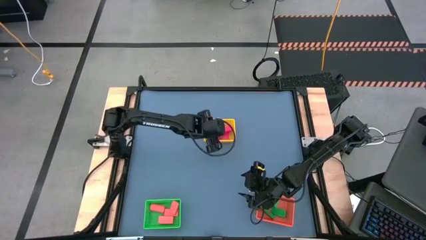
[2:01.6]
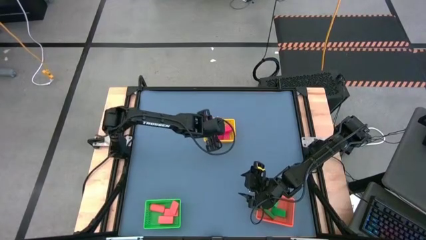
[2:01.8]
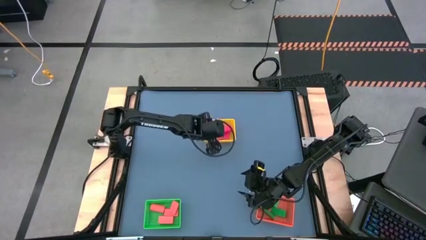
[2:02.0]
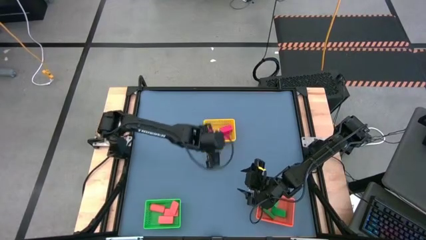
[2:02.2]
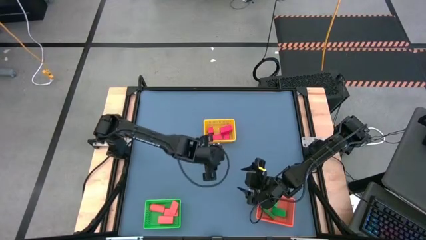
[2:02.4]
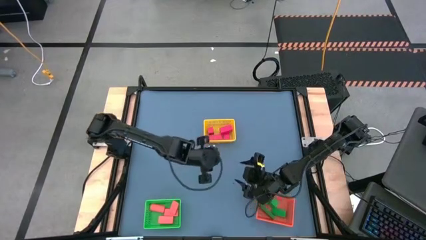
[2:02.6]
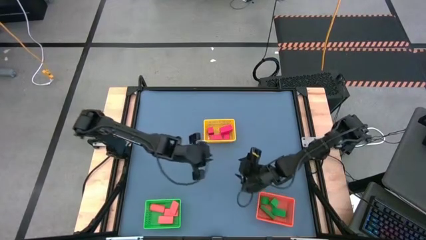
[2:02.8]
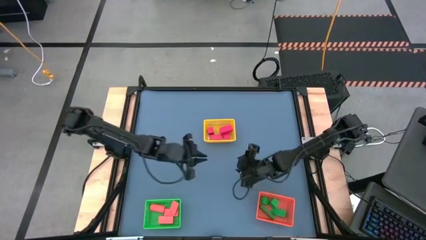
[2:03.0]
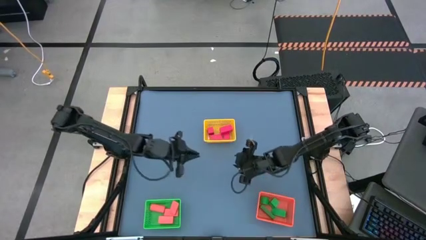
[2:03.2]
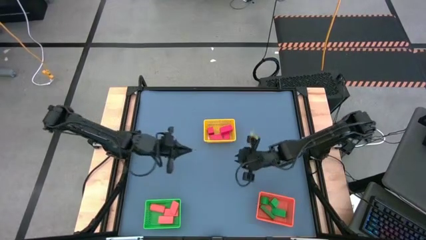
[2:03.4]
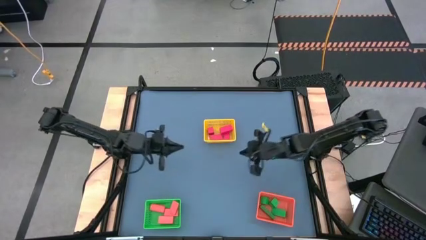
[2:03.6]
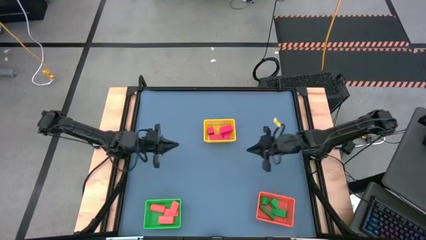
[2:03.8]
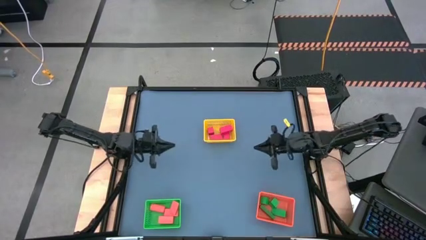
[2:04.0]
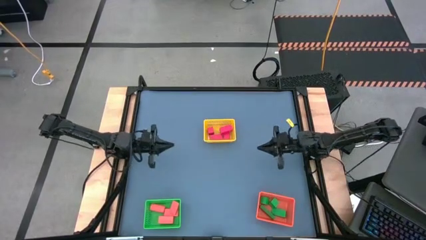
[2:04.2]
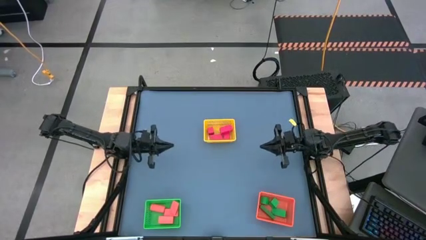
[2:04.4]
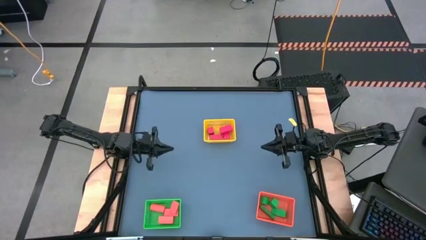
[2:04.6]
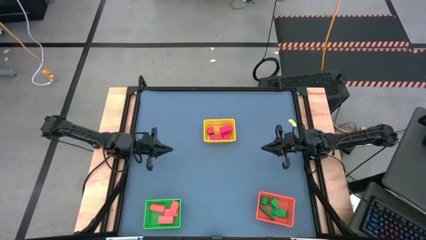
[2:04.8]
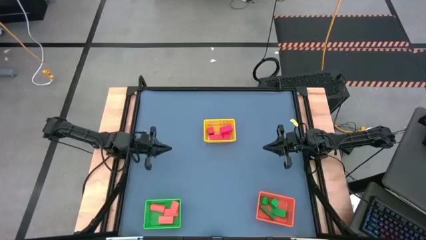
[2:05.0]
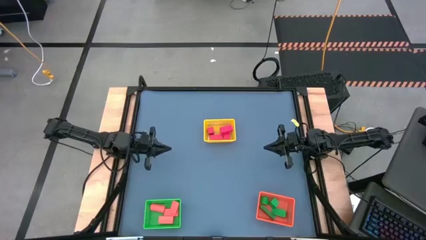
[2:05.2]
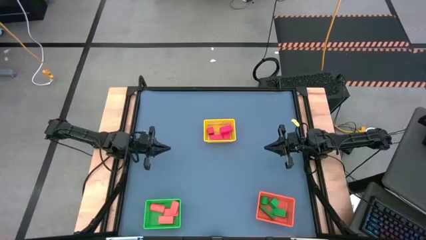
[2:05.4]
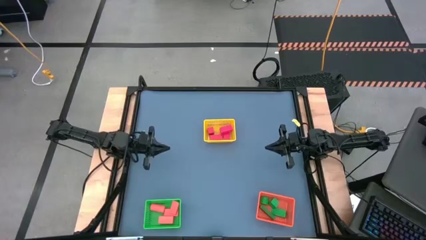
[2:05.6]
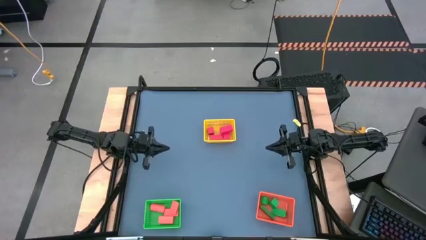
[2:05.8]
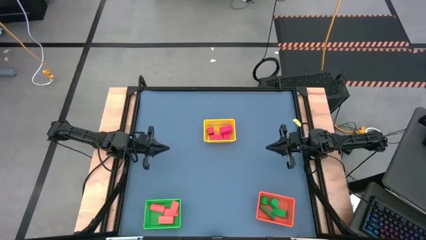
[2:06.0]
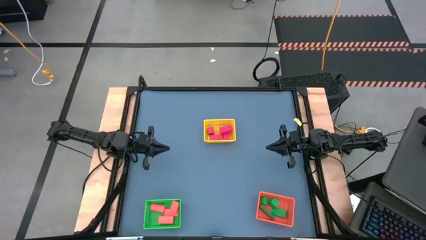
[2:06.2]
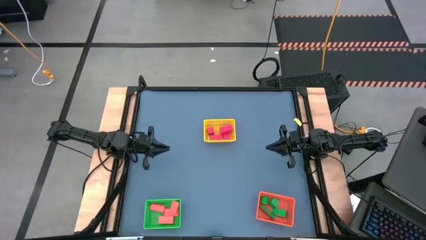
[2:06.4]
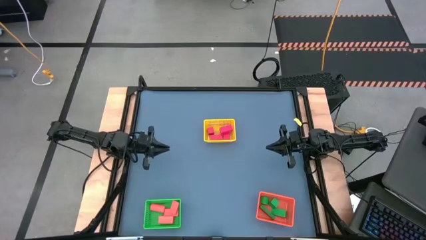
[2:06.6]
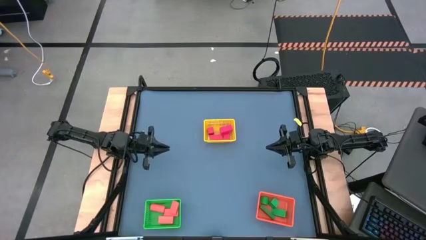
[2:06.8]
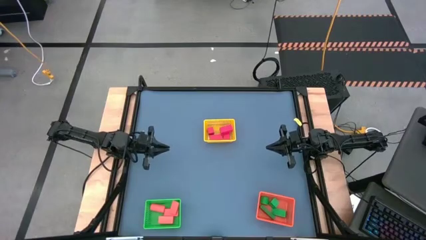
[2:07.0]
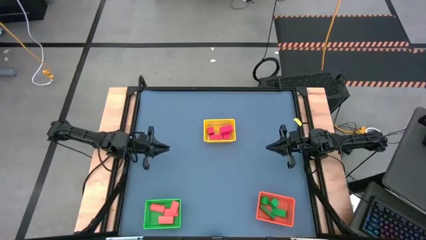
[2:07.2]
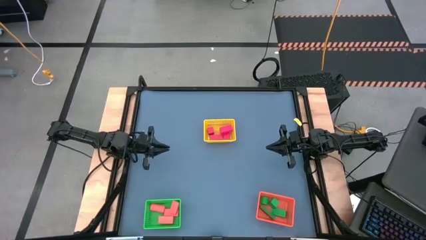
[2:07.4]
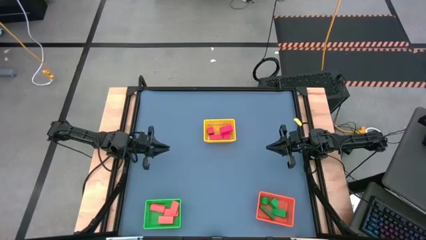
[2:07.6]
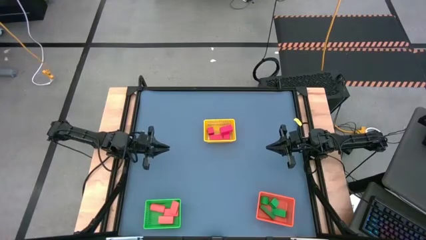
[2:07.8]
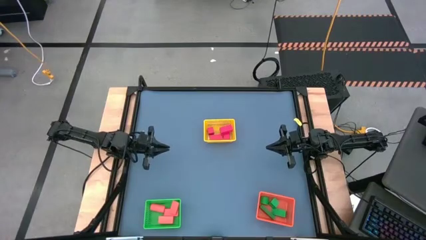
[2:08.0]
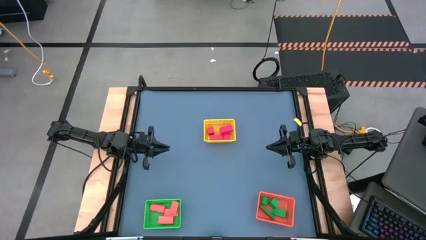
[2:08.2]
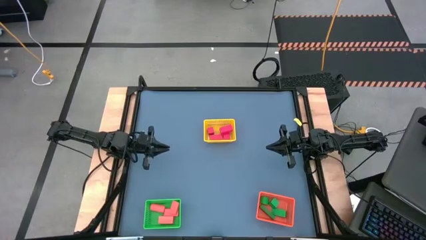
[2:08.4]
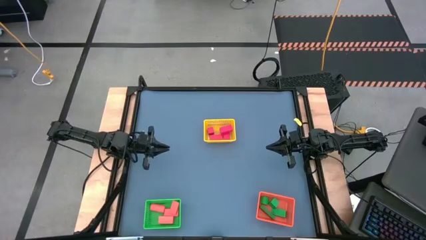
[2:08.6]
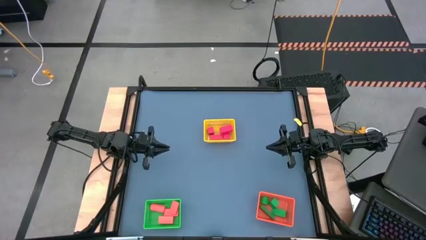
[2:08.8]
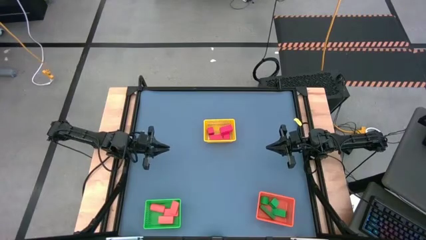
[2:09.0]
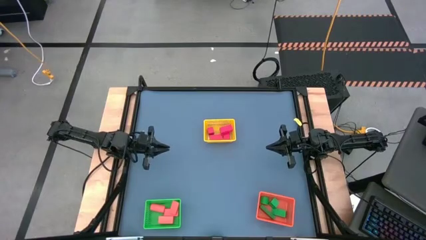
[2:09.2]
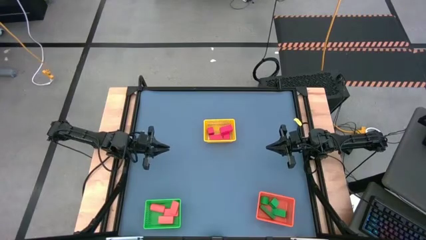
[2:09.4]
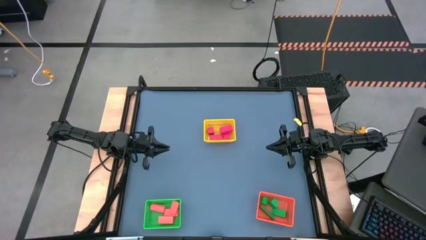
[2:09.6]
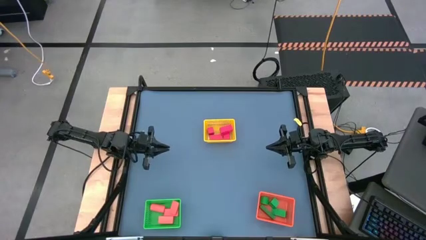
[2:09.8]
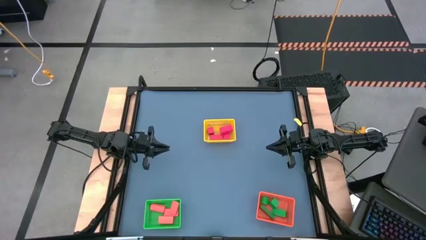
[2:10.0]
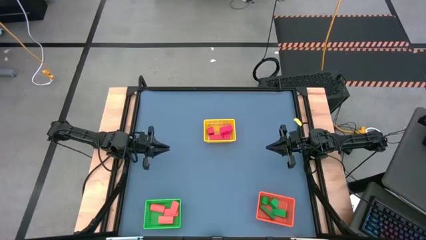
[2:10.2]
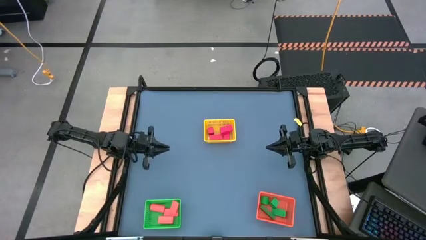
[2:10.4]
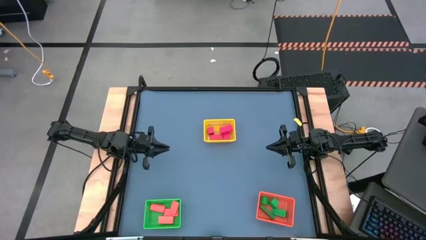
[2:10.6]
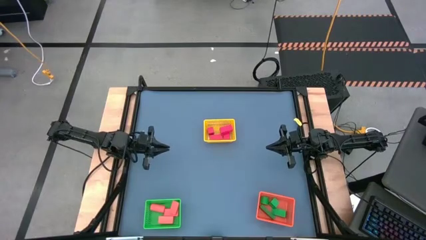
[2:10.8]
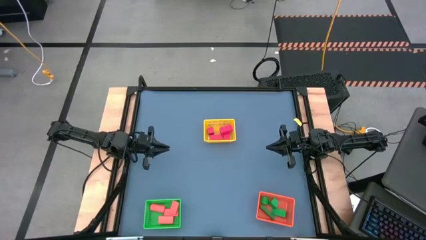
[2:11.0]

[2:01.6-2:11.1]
Task: Sort & place blocks by color
Return to Home Position

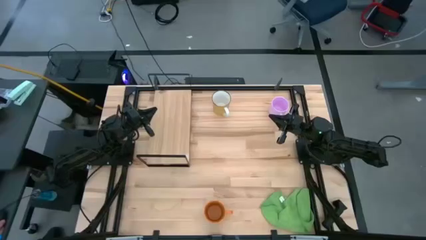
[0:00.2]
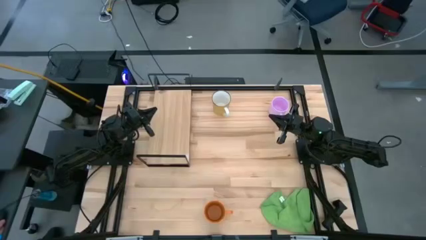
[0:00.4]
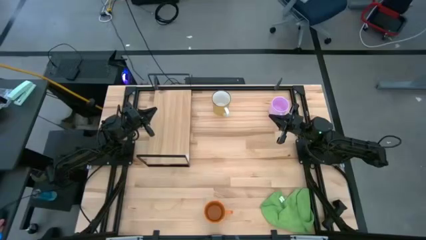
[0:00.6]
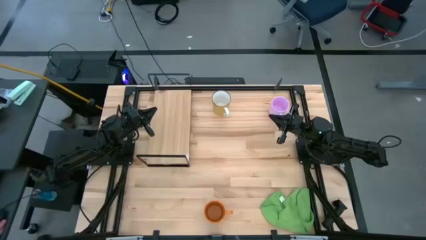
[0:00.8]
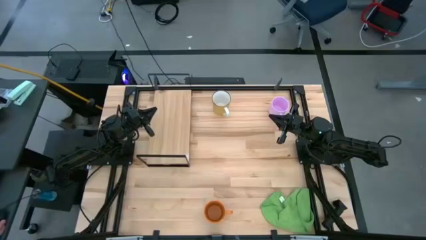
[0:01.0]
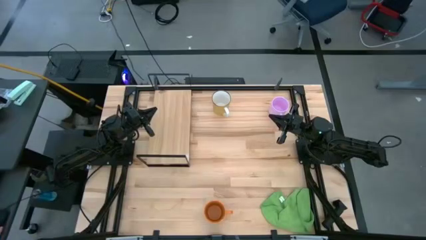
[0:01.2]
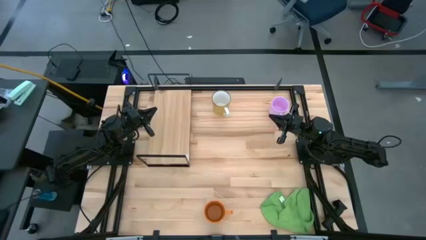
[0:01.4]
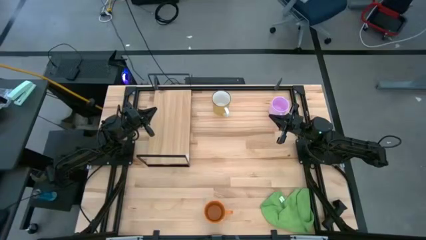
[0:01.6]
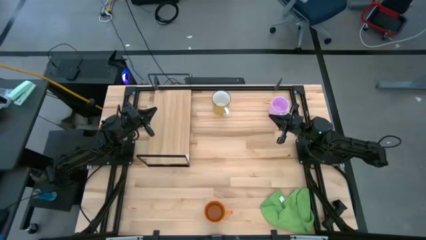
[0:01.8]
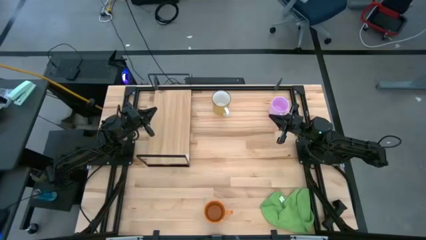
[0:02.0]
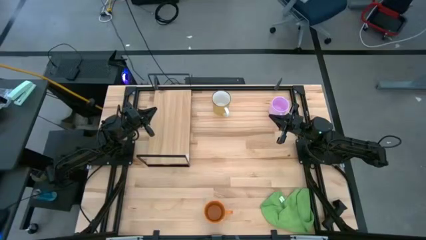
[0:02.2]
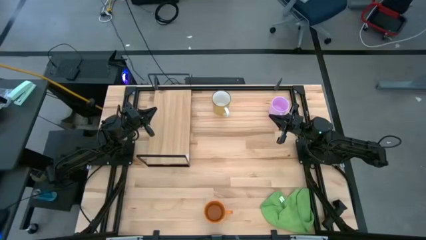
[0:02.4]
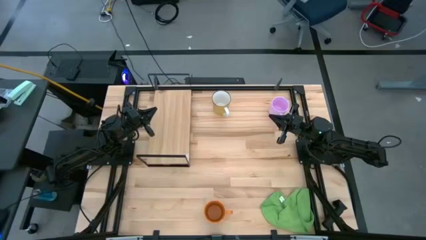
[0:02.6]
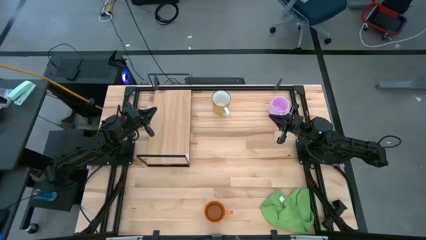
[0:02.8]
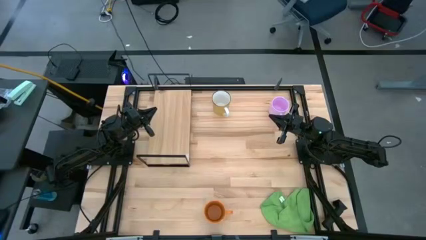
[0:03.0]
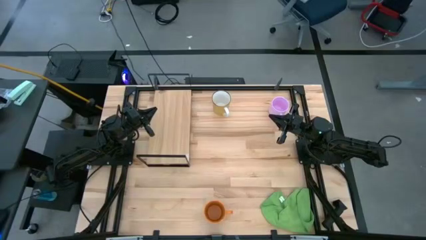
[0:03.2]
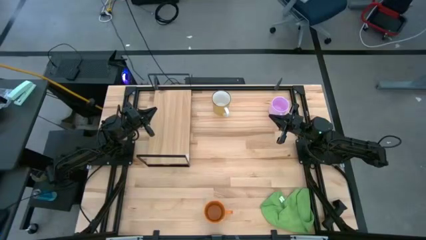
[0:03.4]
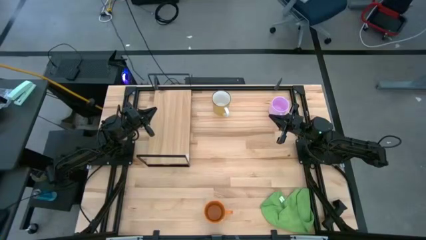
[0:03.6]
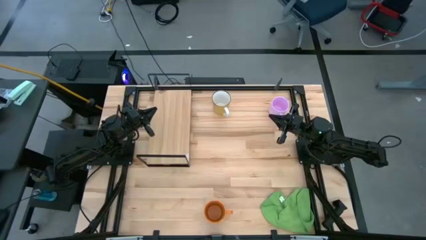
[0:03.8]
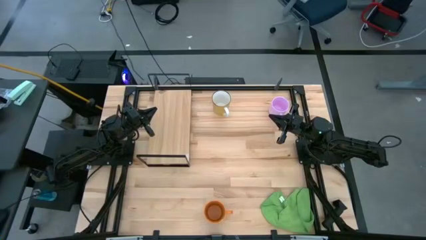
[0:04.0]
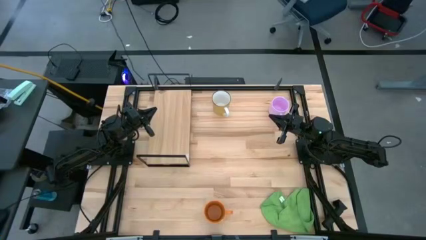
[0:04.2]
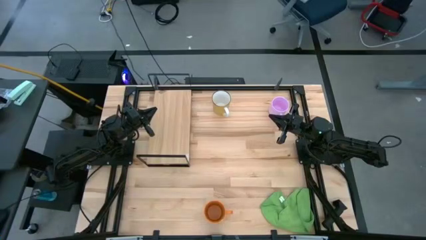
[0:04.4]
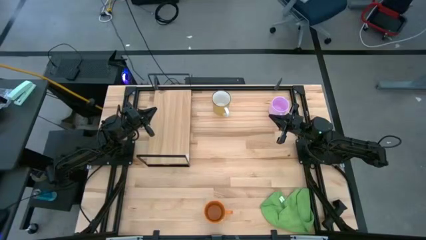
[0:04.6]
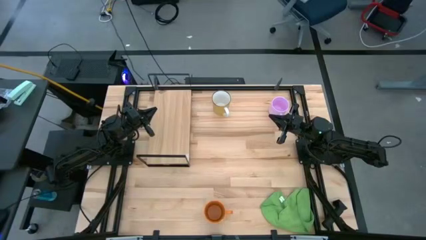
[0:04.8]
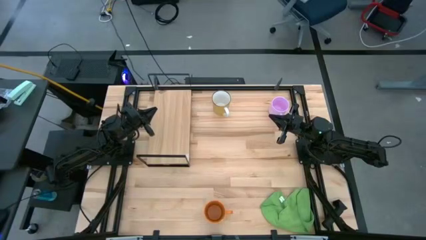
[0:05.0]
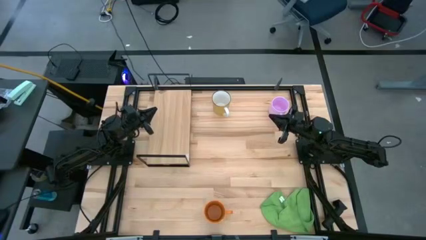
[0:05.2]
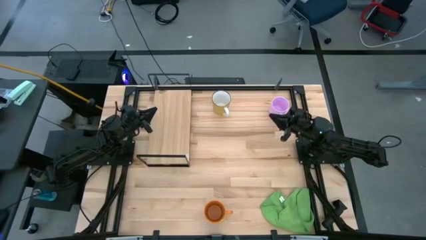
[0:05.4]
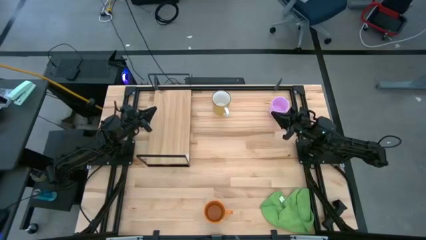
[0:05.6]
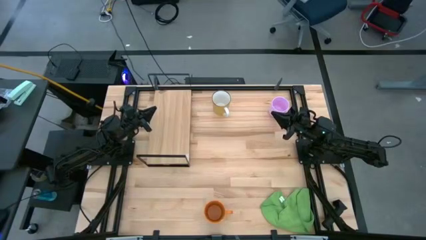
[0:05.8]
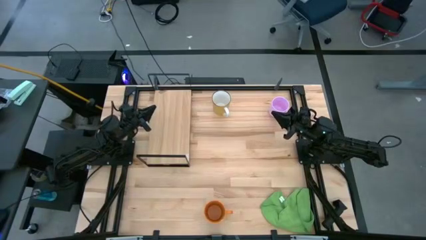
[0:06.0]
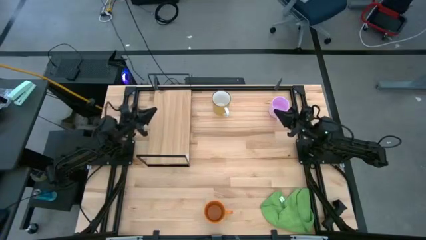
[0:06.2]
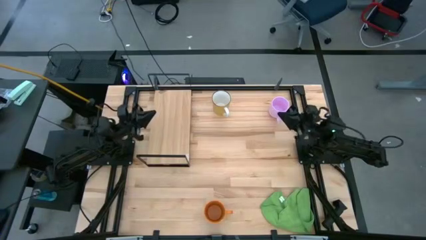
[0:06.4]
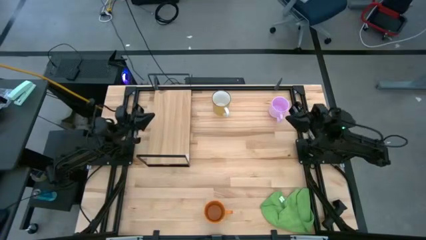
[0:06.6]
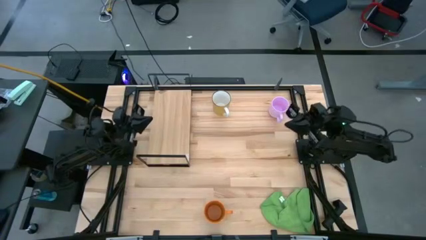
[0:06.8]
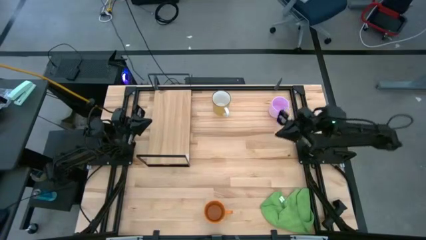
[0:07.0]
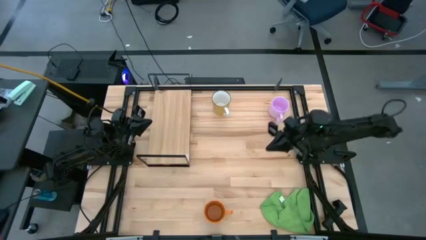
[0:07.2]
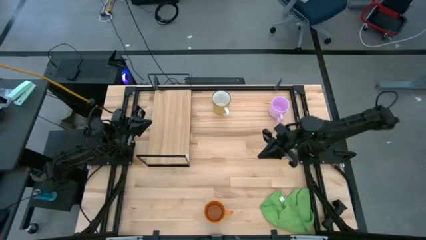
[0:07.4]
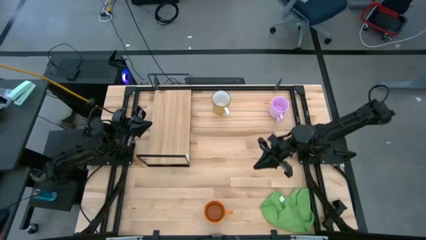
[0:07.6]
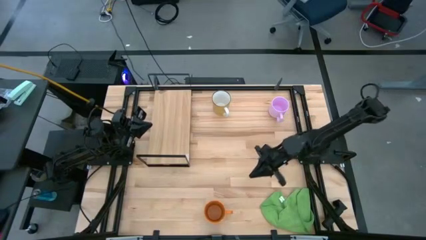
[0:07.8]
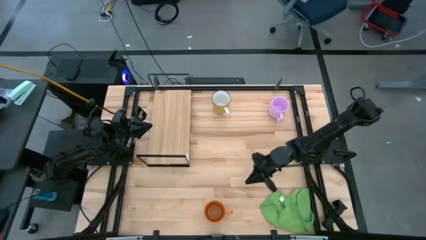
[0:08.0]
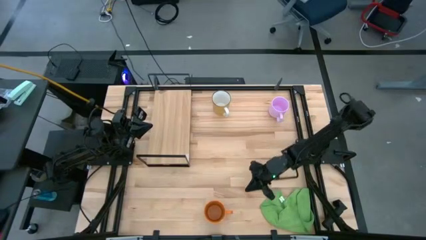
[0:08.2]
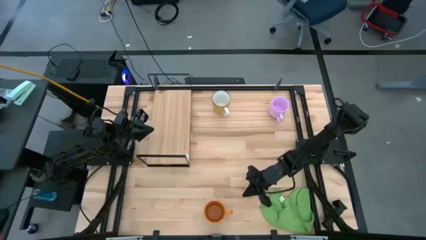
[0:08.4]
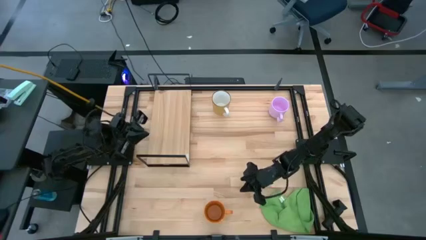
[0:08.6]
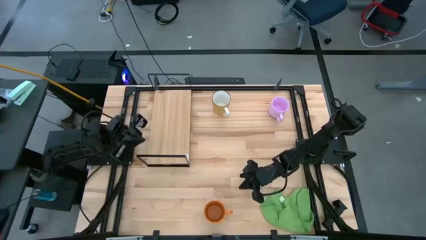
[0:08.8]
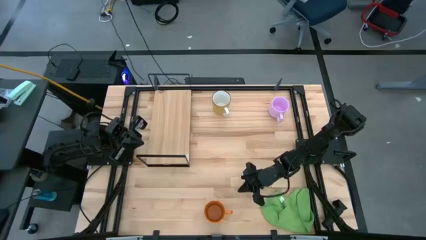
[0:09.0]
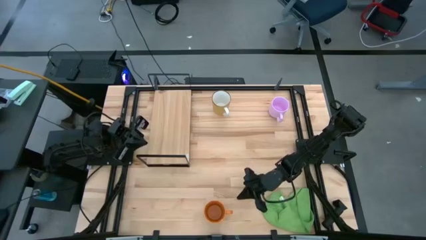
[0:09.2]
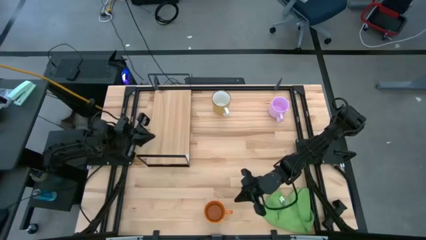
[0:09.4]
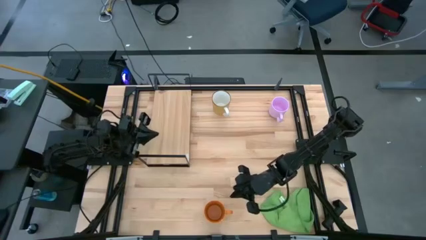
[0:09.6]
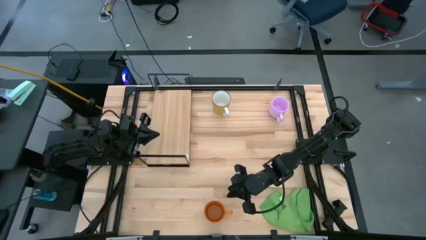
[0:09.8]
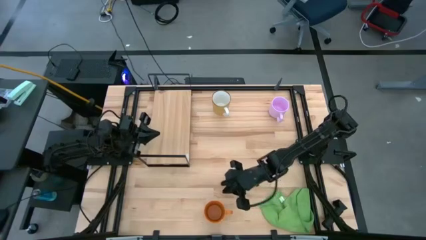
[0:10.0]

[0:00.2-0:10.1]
Task: Stack small to large cups/mugs on shelf
Move the orange mug to the top middle of the table
